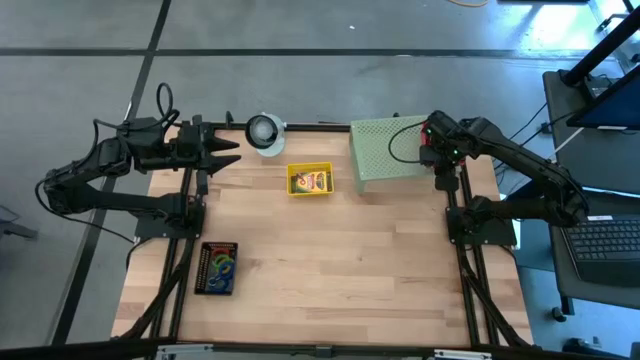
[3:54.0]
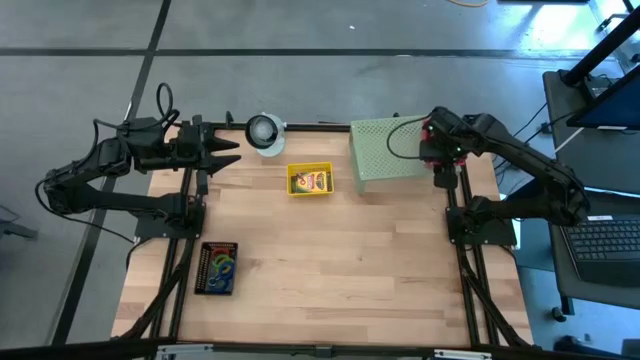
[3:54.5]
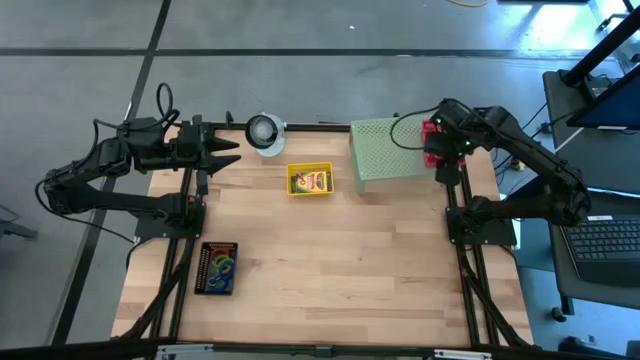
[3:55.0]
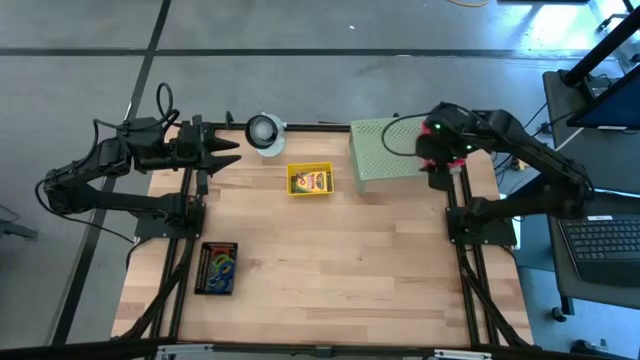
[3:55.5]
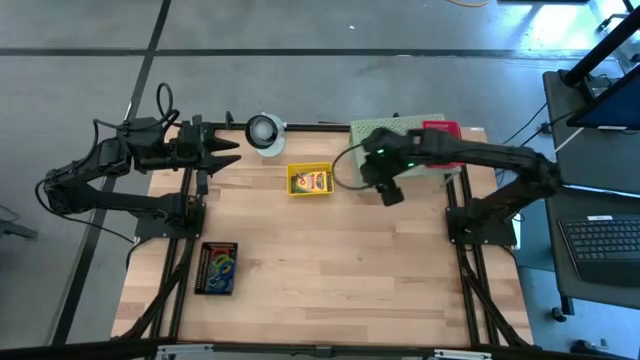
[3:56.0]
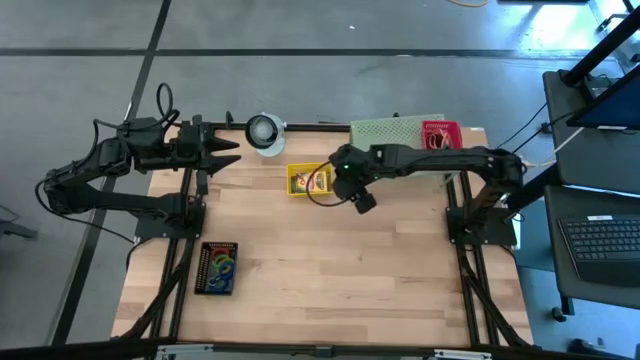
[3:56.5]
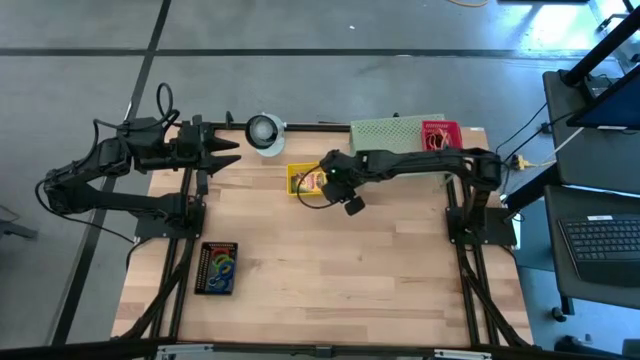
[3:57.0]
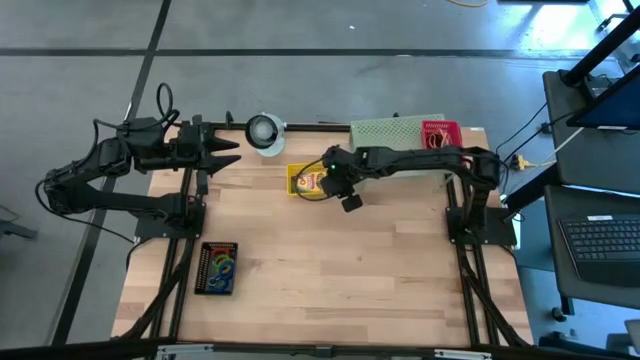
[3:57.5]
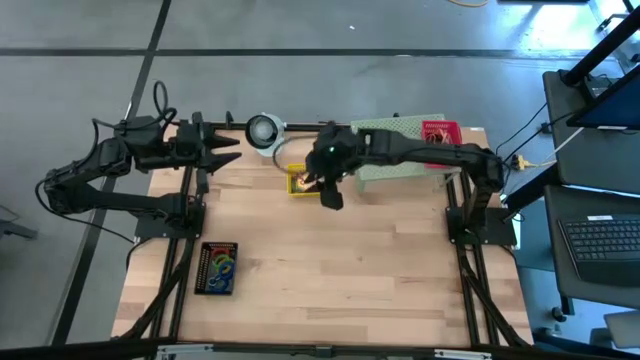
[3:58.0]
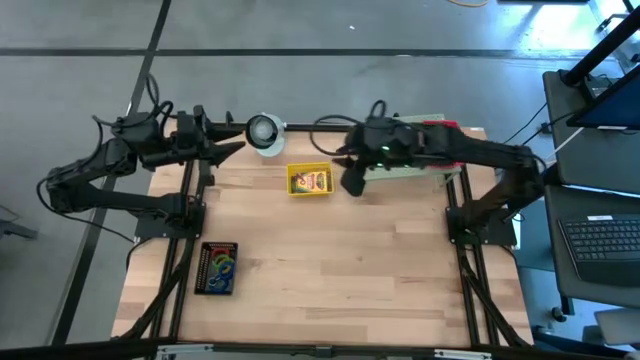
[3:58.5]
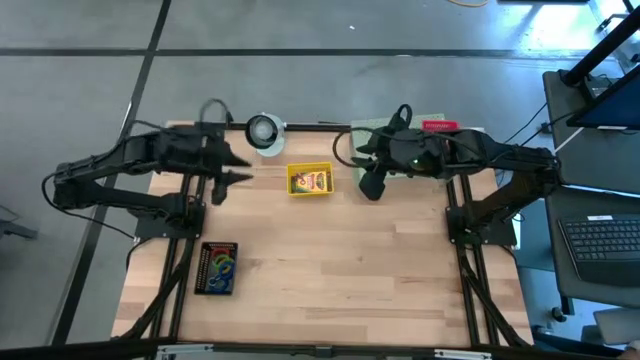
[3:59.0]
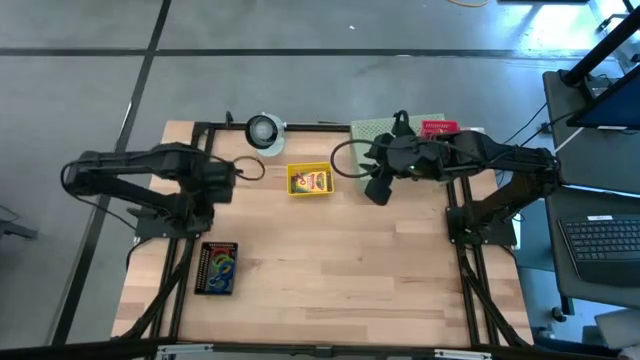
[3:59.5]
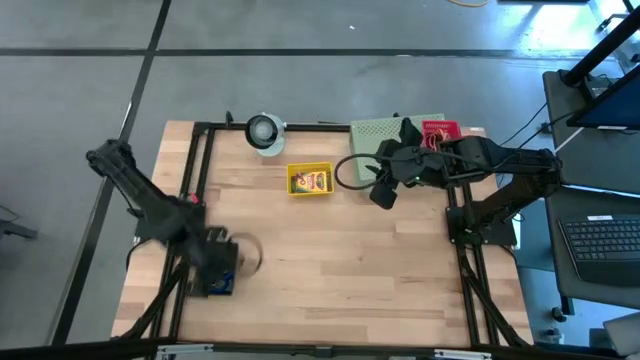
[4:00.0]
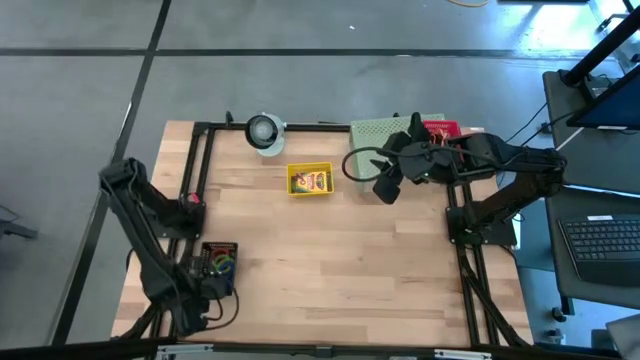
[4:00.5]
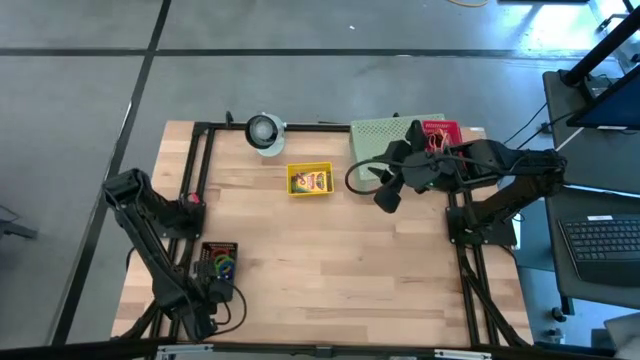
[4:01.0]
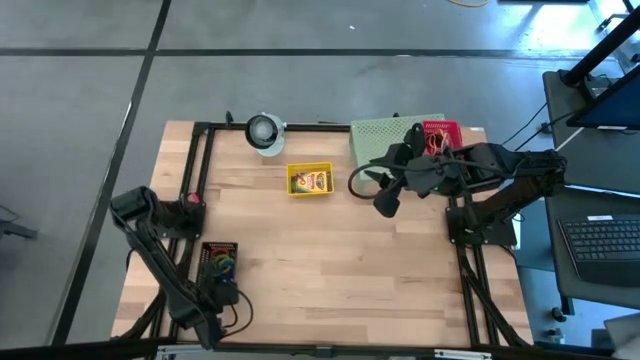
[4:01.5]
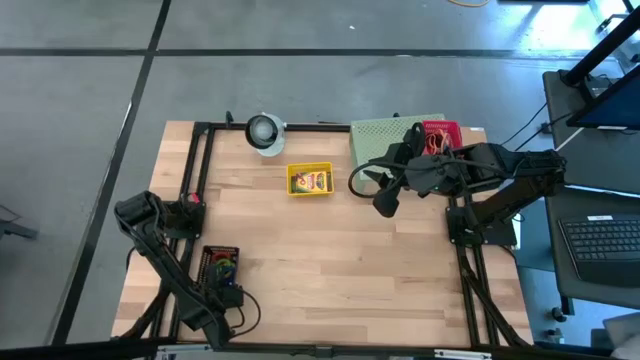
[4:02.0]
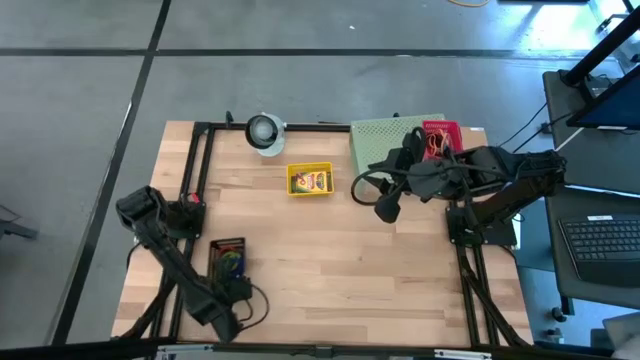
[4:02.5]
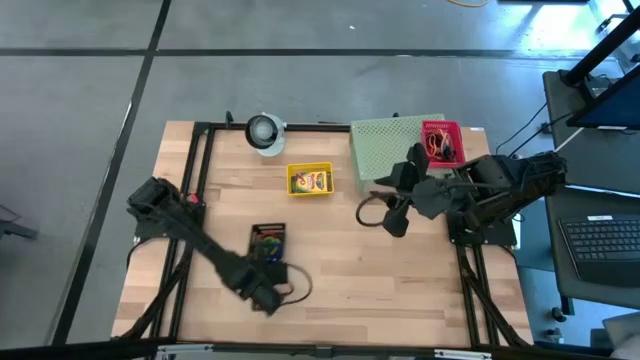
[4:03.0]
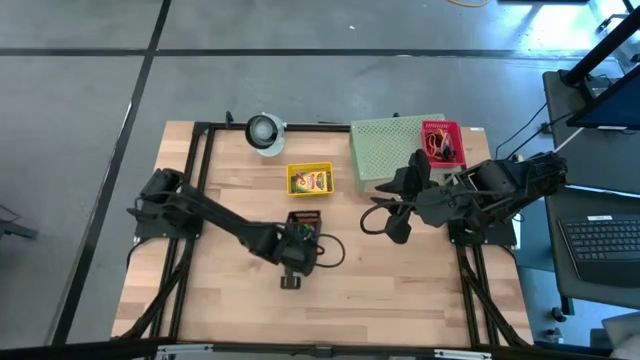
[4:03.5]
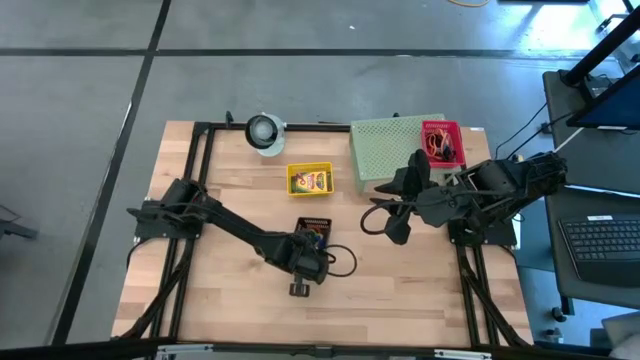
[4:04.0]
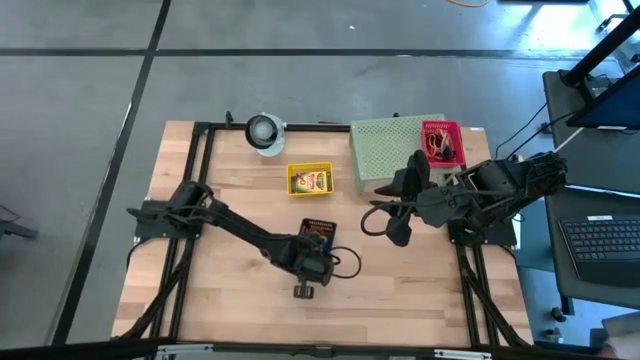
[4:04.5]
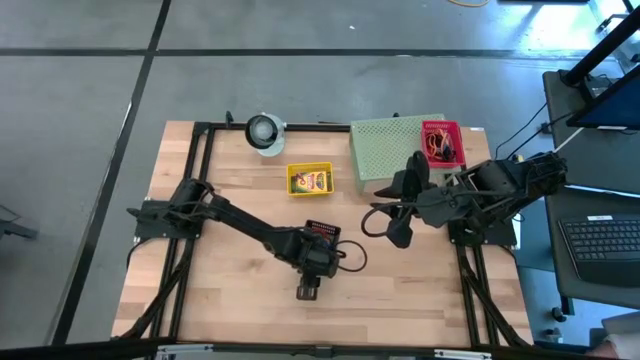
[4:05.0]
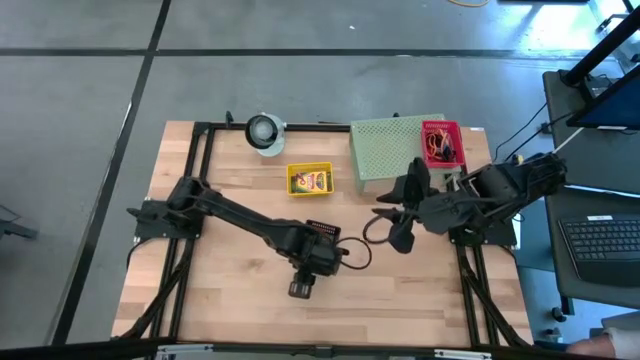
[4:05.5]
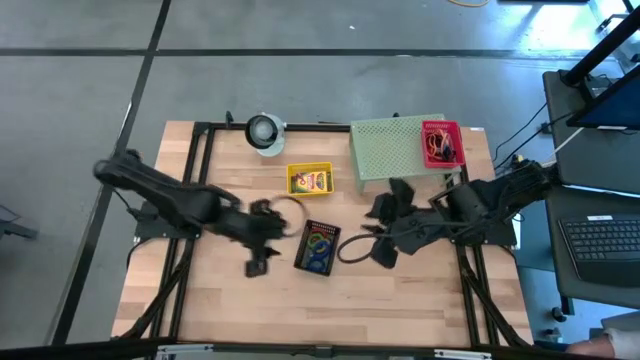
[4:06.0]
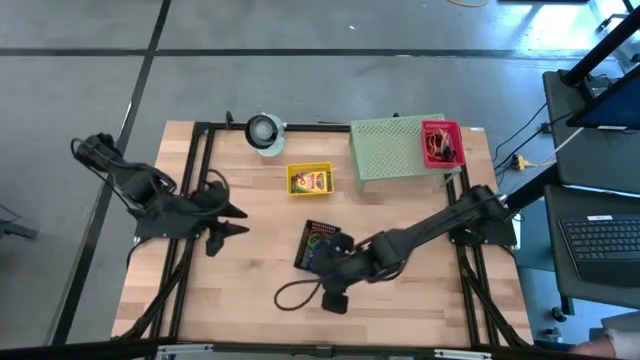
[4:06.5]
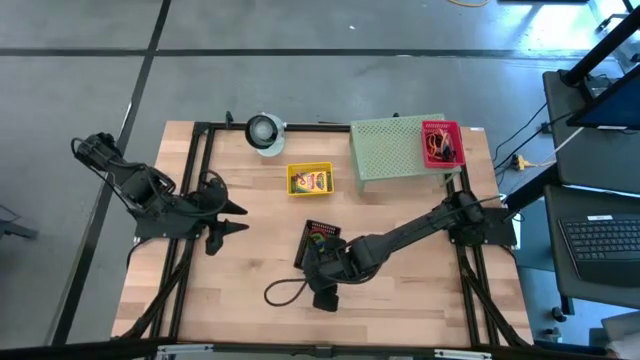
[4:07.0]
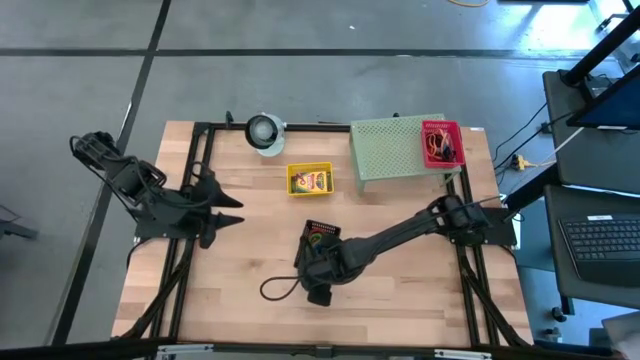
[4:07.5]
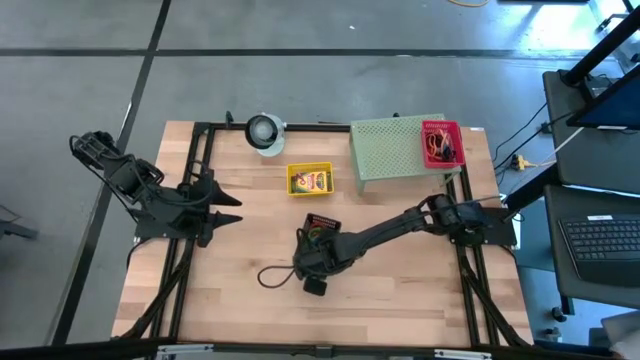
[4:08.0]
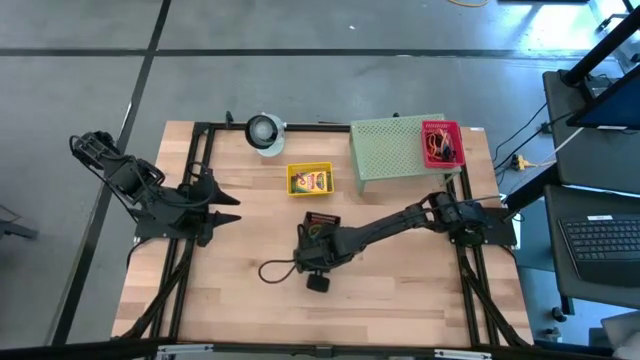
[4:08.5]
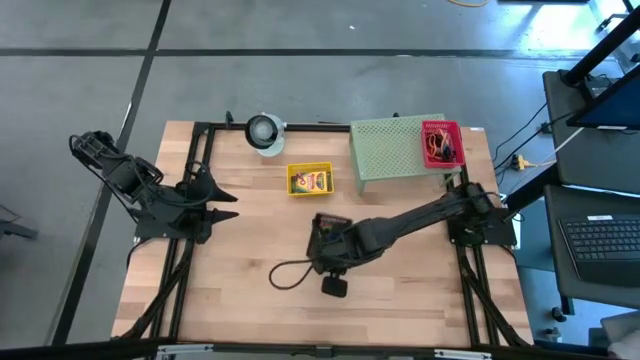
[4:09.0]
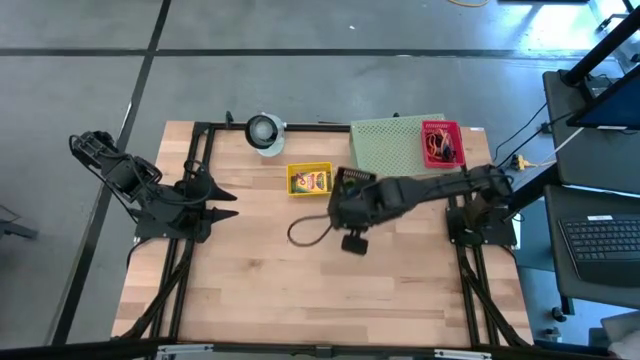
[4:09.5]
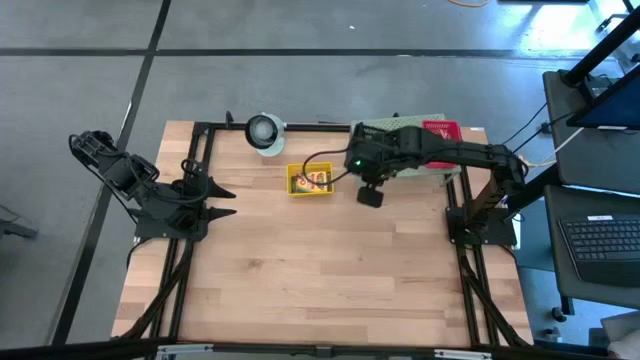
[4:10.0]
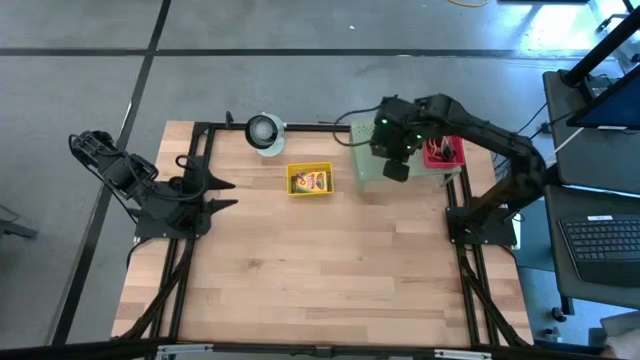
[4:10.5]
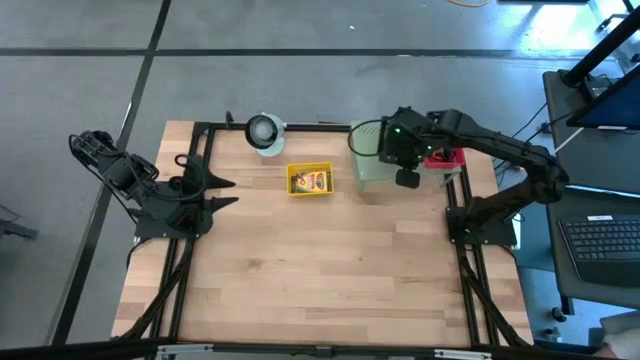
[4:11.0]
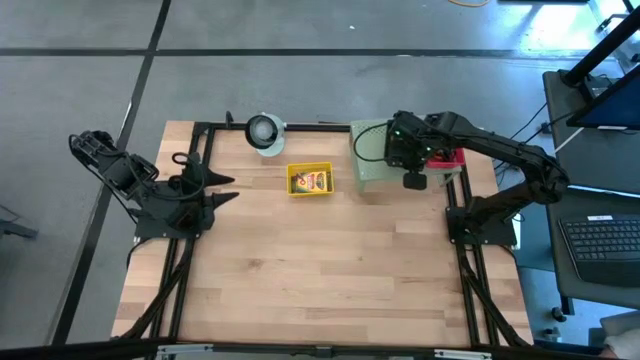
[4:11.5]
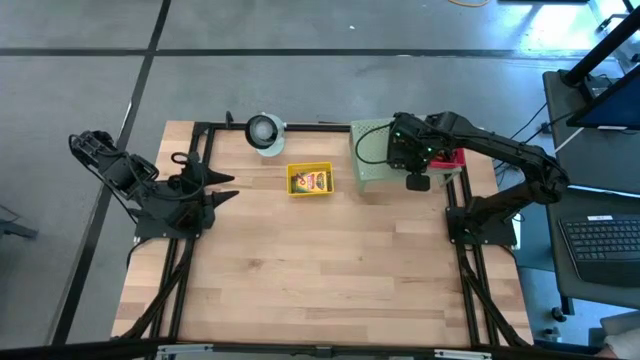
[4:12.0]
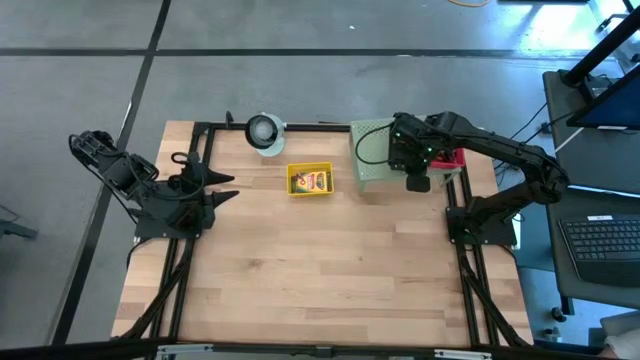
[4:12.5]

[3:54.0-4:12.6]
Task: Pick & Place Office Desk Supplies
Put the black bin filled with spring keychain on the shelf

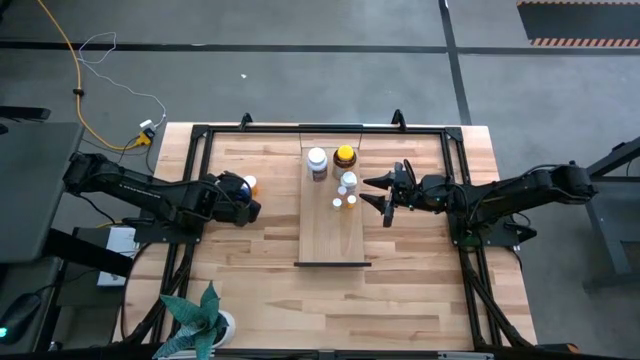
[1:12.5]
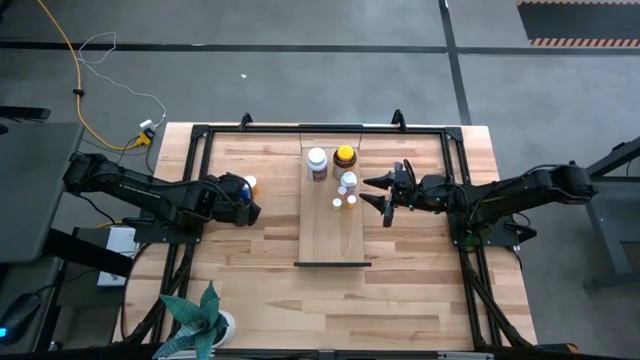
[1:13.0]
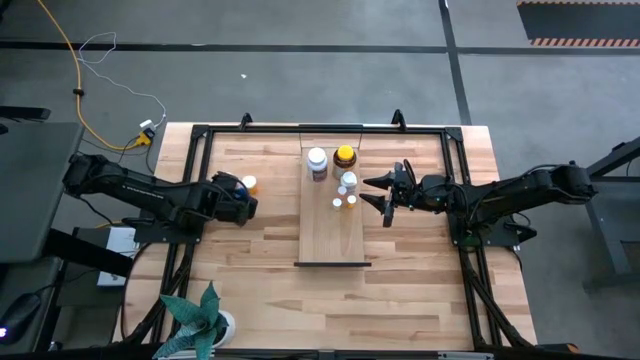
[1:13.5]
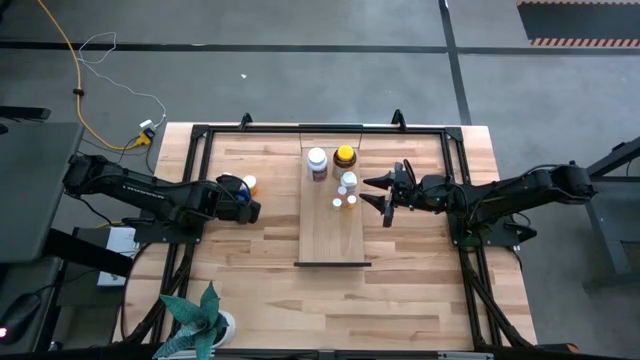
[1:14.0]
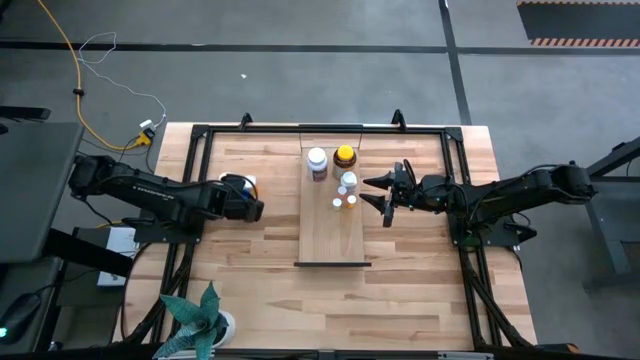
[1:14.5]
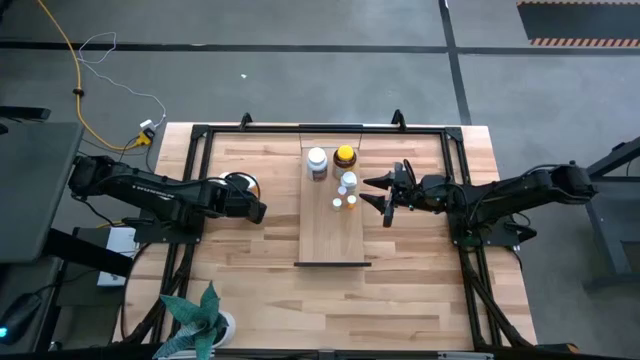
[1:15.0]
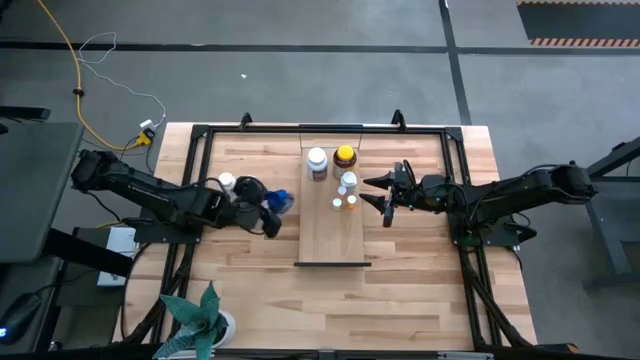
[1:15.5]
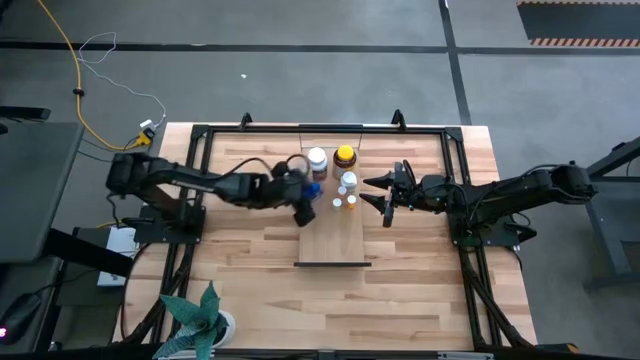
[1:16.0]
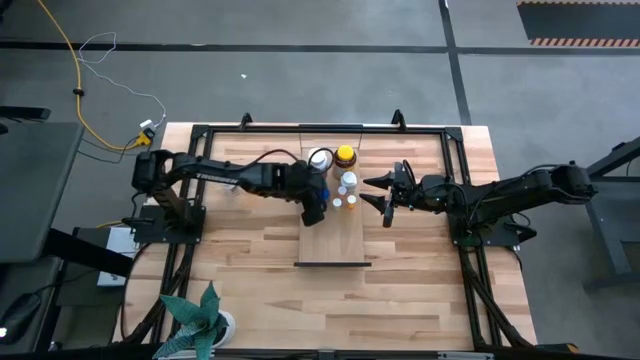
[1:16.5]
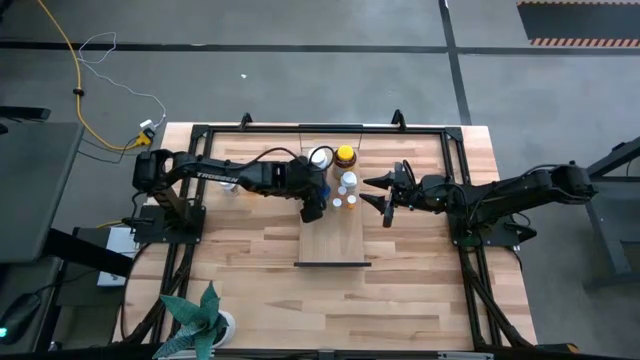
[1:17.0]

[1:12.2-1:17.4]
Task: Pick and place medicine bottles onto shelf by color
Put the blue pill bottle on the shelf
